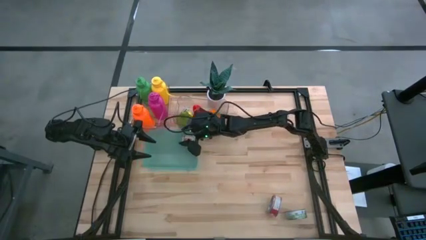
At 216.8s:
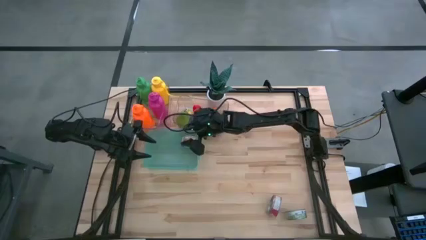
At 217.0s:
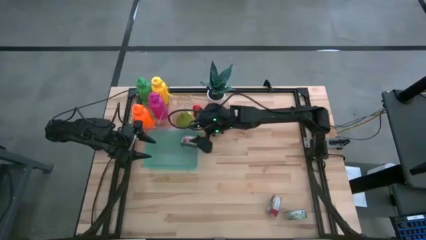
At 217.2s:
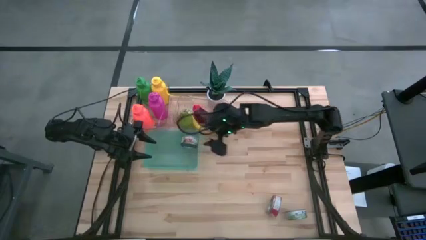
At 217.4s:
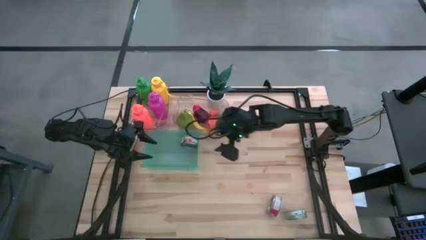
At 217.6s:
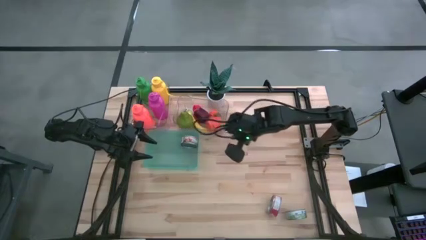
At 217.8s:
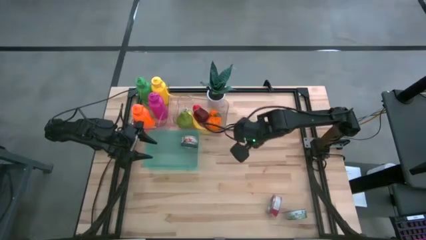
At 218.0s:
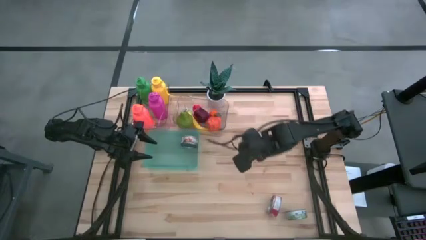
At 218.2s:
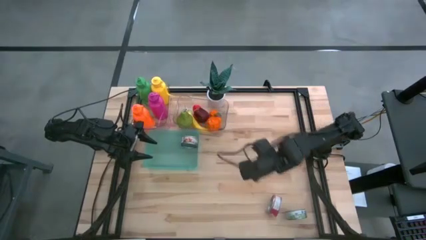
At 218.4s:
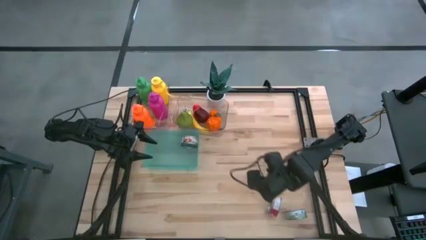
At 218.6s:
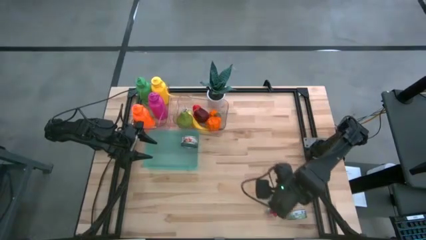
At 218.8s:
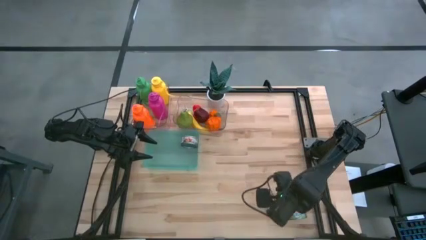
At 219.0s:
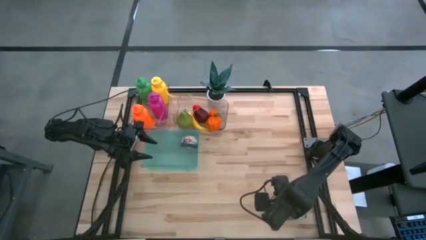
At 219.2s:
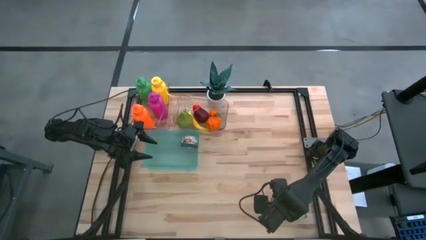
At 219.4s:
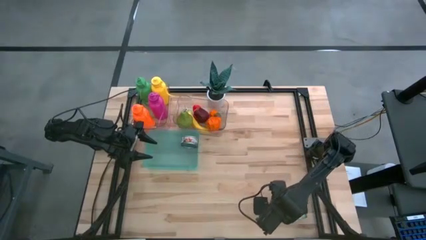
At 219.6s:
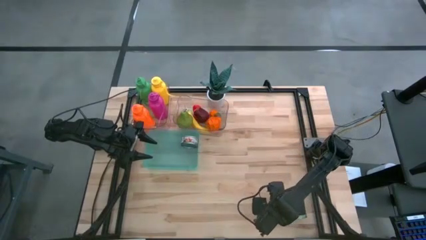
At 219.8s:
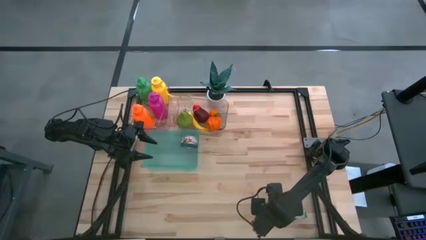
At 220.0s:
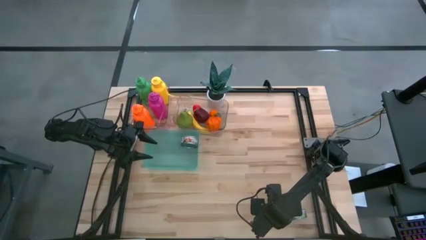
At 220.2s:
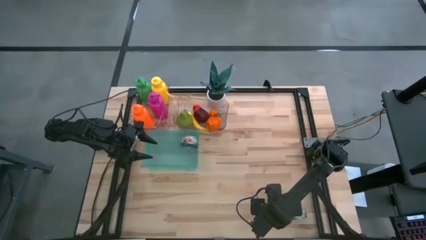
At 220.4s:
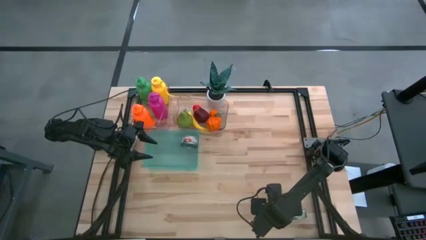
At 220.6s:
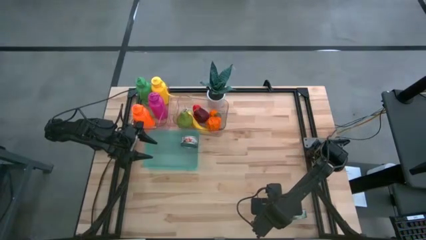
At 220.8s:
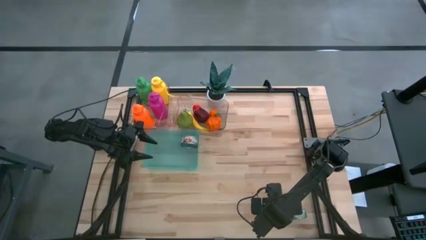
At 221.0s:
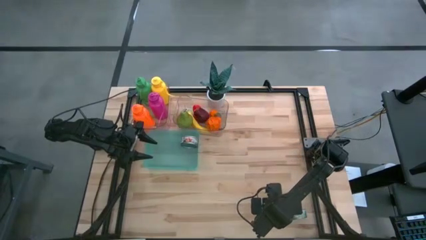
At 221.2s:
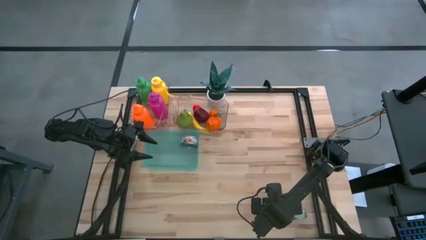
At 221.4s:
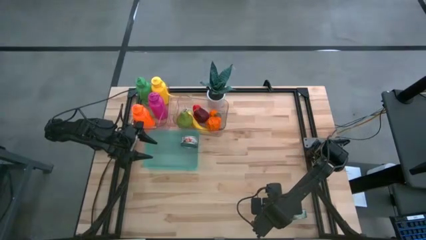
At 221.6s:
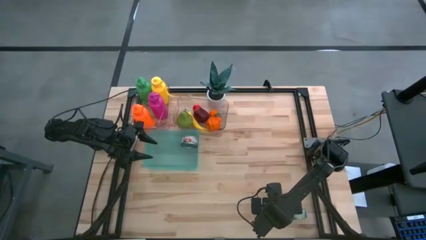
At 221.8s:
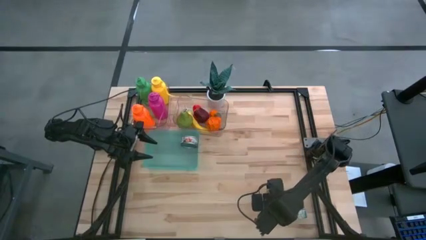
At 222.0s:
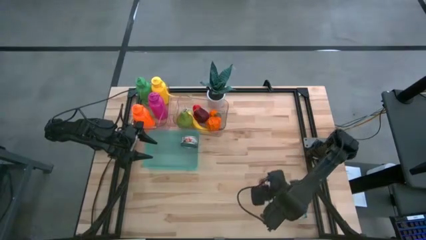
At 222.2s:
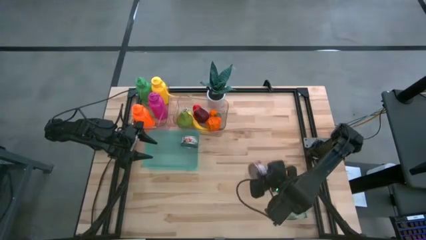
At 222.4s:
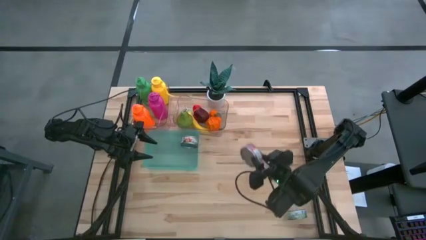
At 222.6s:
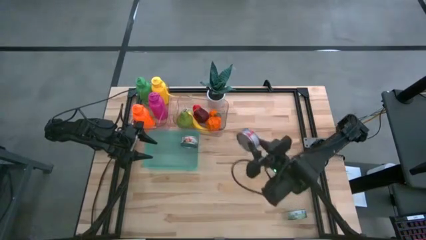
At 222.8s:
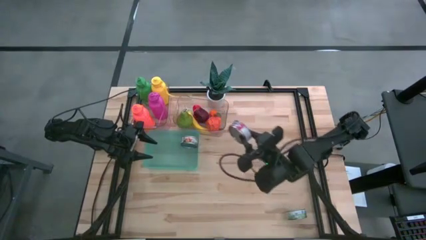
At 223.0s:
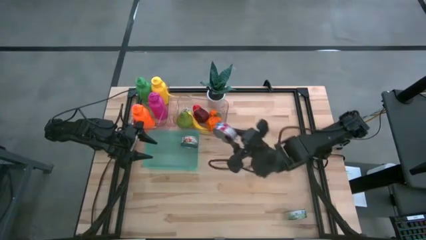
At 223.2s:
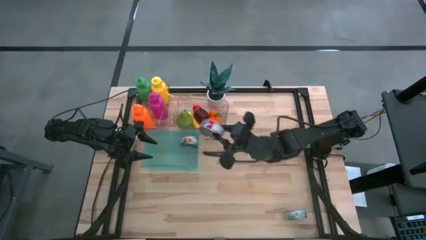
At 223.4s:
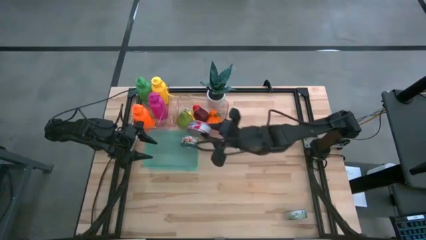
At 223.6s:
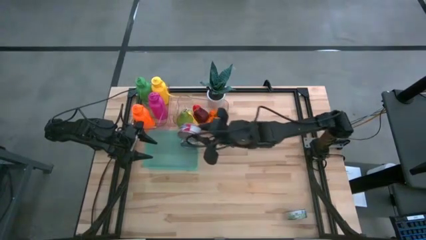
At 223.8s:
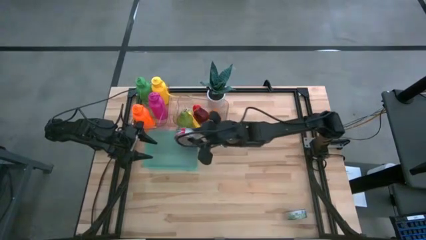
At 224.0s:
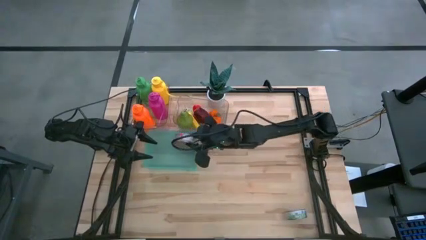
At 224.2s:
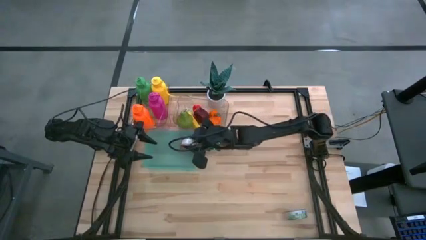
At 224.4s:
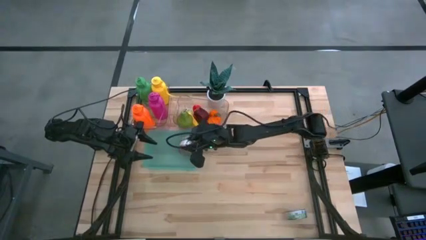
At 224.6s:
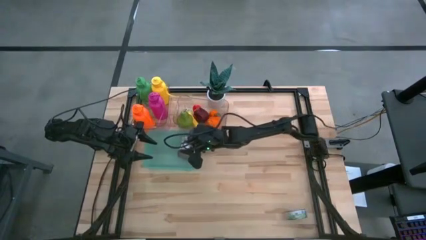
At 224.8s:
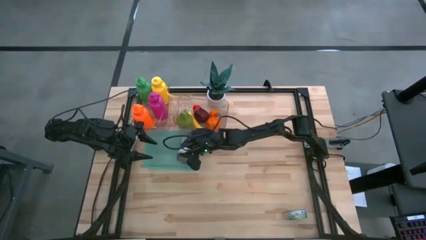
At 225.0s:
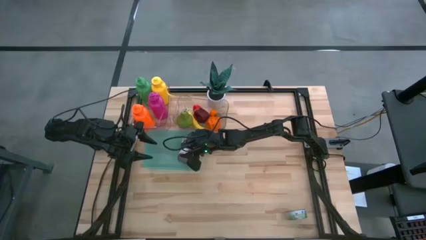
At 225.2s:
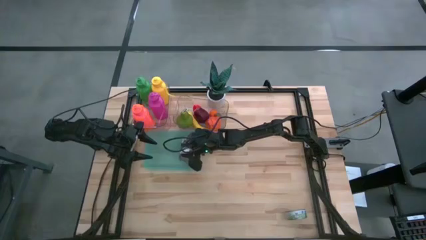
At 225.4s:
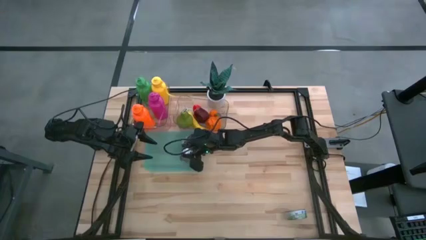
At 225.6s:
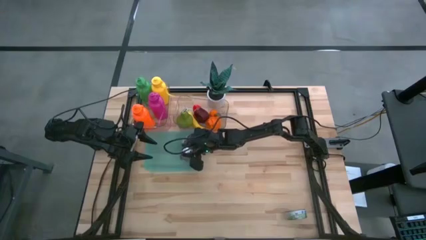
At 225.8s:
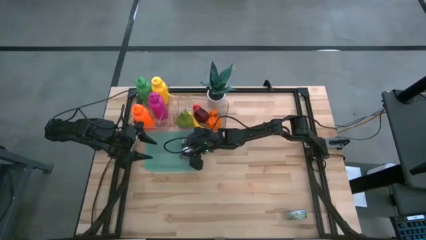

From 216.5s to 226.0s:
Task: Pick & Place Food Item
Put the red tuna can into the blue bin

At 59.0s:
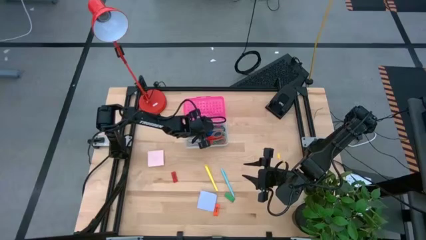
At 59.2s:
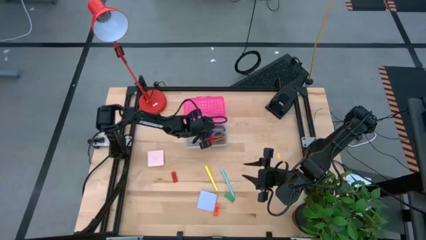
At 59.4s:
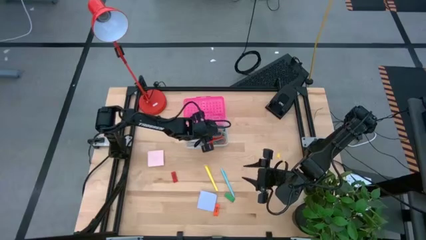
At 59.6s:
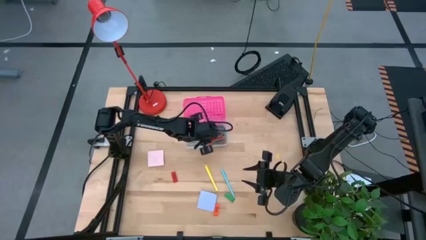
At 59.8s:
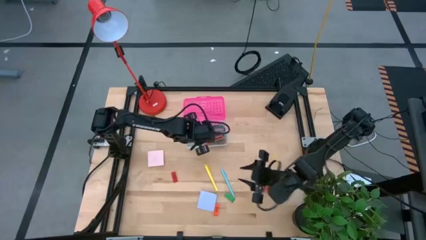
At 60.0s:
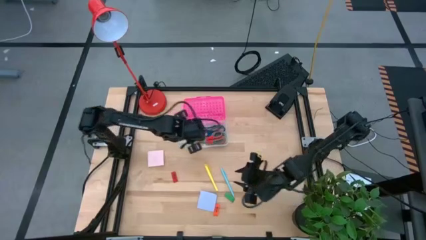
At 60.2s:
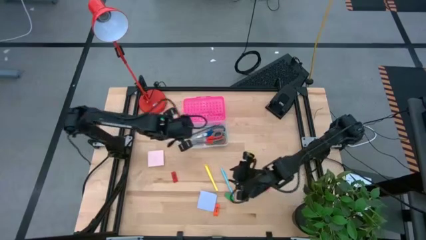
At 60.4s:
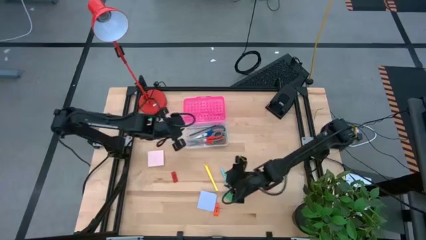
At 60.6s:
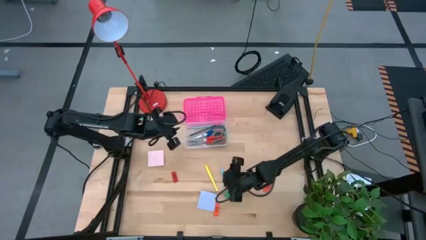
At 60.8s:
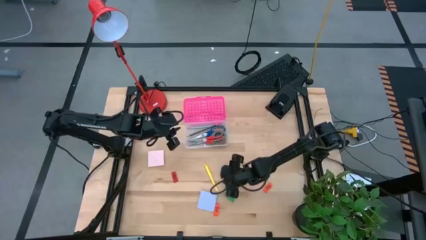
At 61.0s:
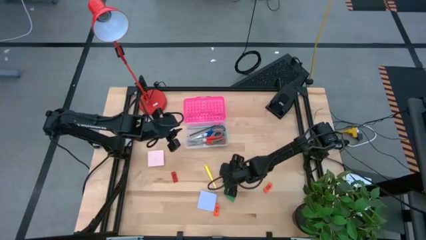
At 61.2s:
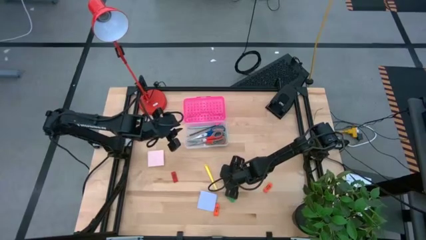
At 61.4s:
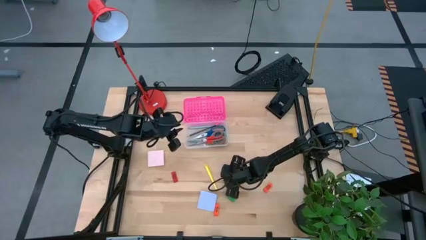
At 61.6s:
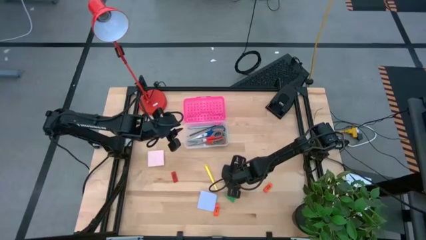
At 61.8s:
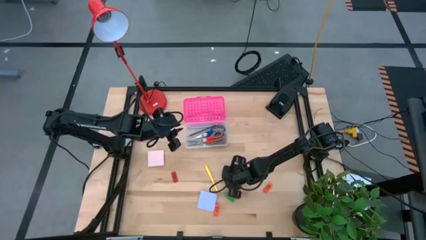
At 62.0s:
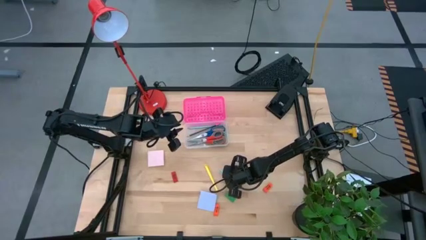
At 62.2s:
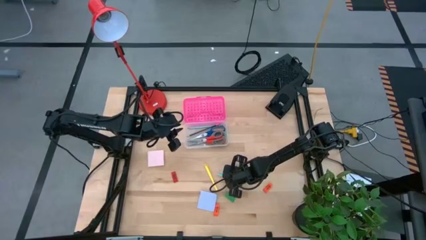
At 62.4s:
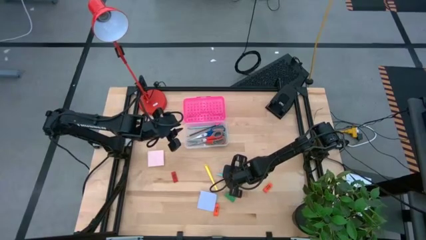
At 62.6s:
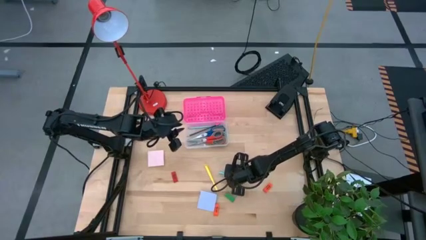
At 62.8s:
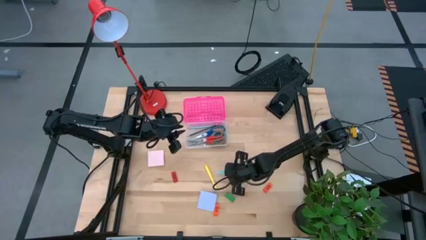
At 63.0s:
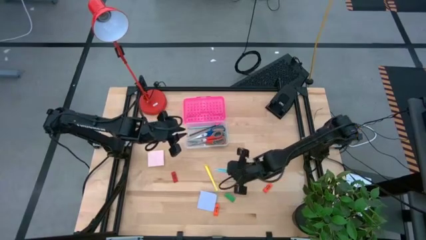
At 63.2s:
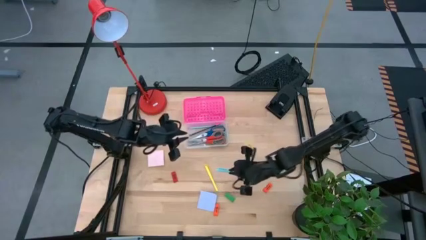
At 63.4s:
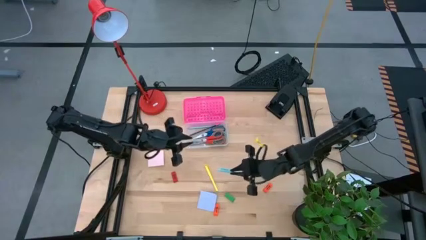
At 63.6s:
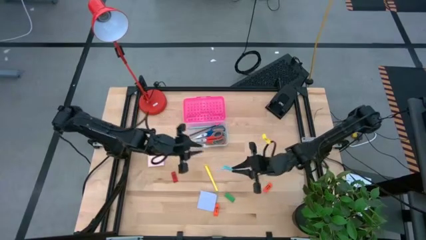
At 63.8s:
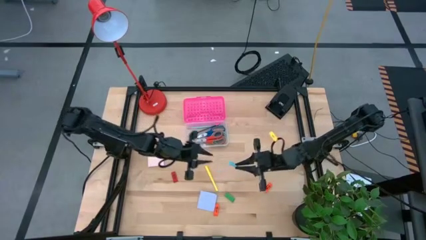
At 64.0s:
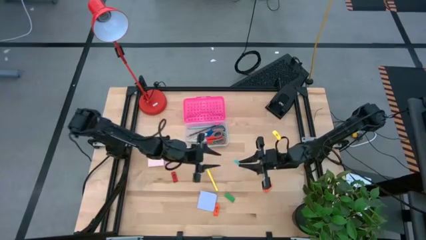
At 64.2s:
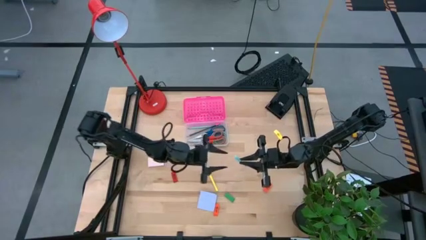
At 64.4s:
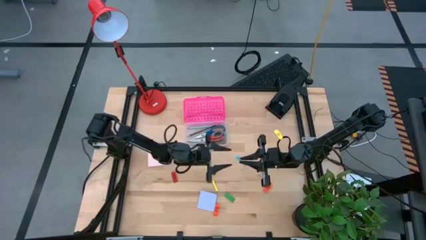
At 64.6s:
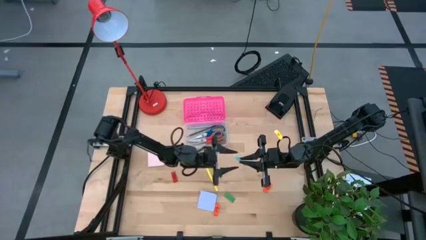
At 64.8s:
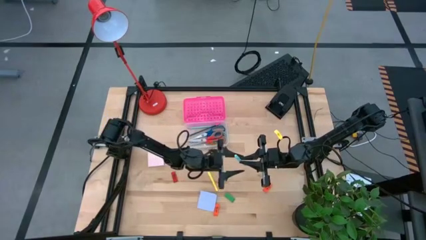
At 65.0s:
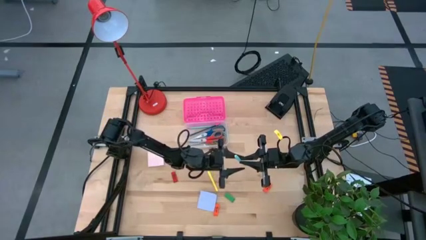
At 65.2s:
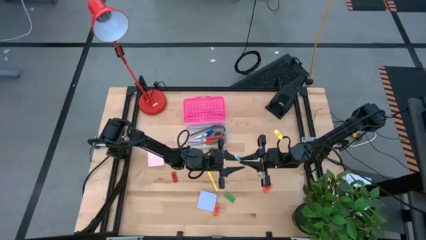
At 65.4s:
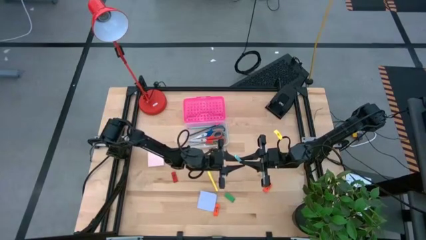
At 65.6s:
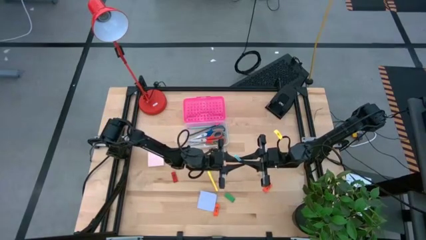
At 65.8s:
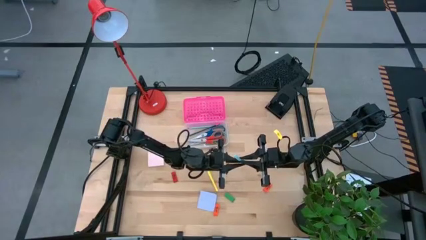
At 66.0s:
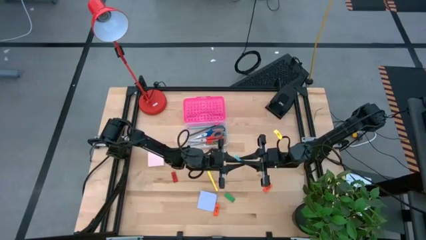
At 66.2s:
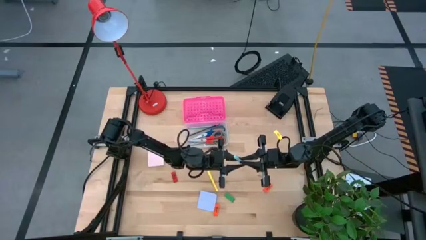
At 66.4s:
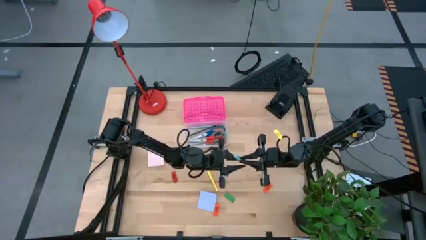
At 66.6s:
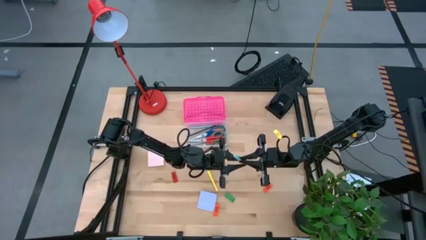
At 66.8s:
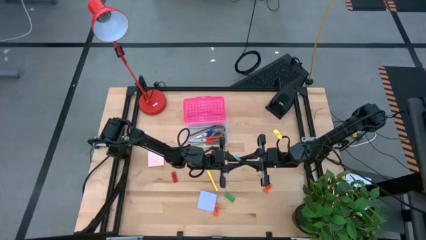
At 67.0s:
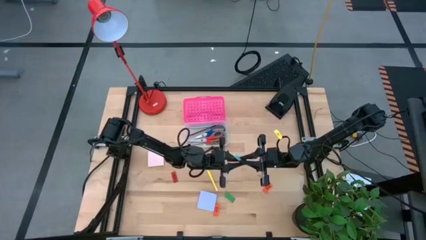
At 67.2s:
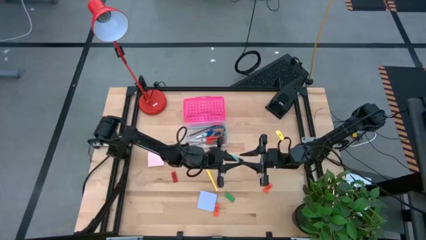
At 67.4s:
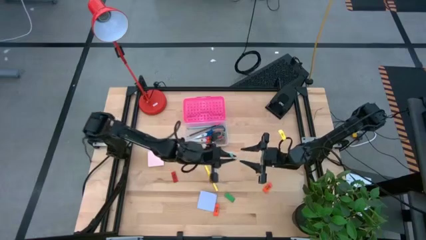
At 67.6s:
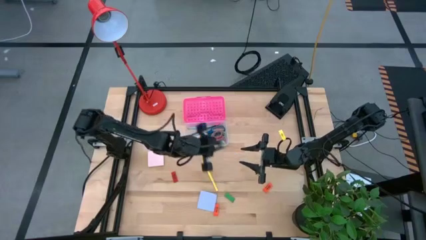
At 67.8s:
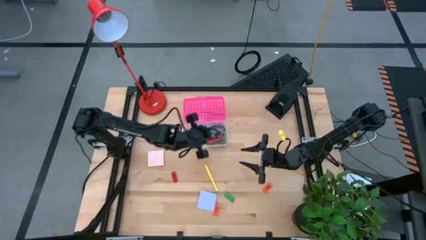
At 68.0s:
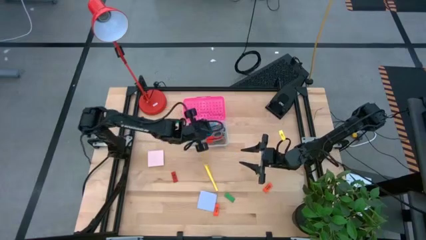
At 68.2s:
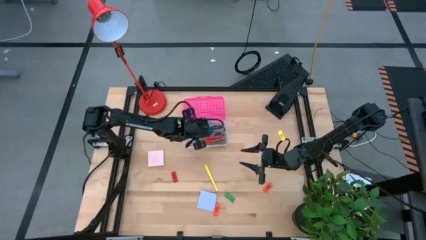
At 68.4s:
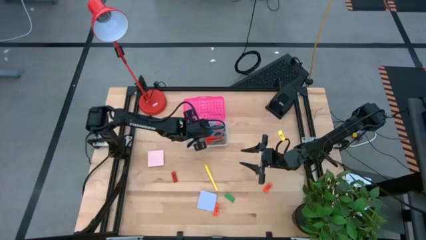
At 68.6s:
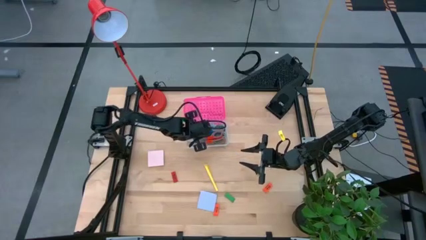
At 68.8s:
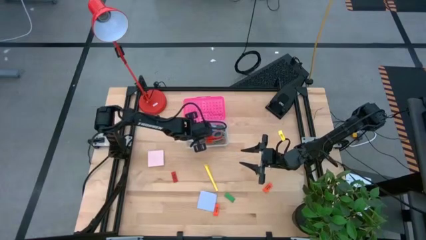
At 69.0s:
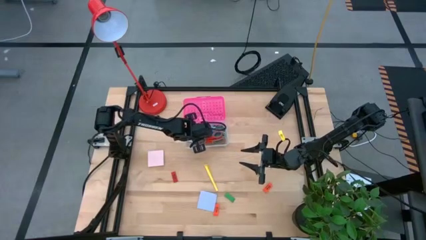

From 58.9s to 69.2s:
Task: Pack school essentials
Put the light blue pen into the pink supply box
